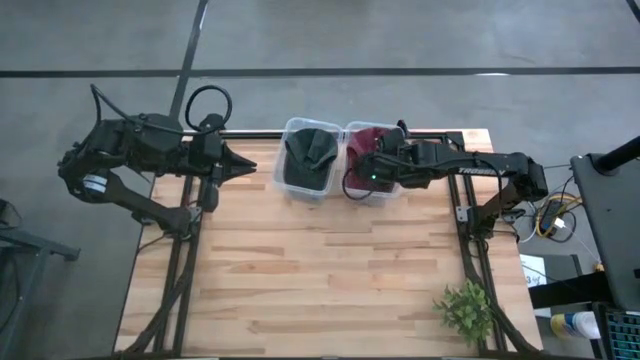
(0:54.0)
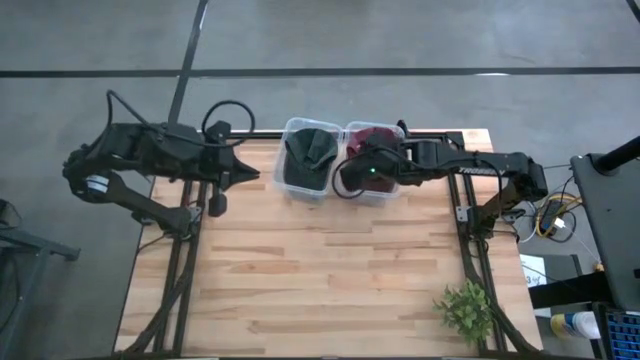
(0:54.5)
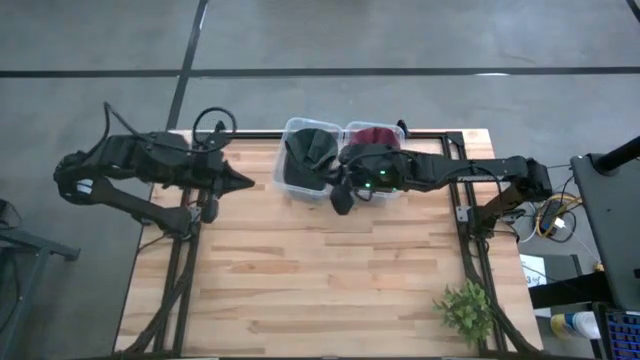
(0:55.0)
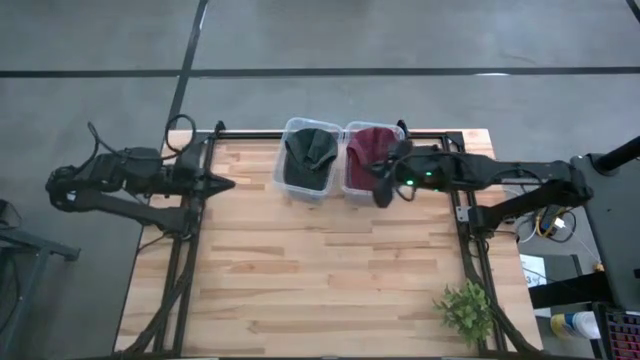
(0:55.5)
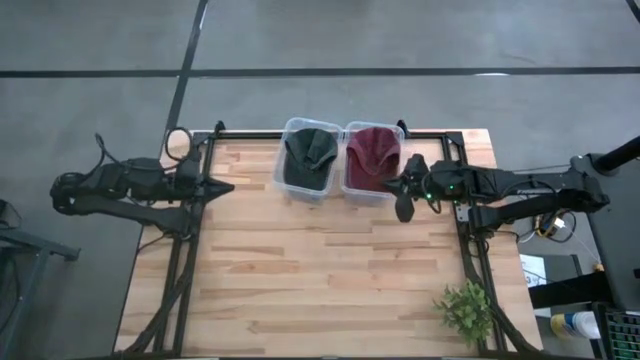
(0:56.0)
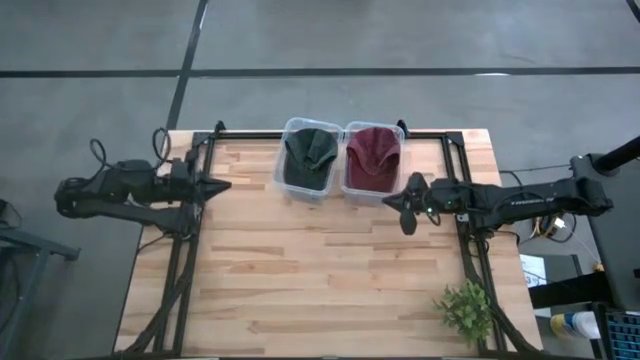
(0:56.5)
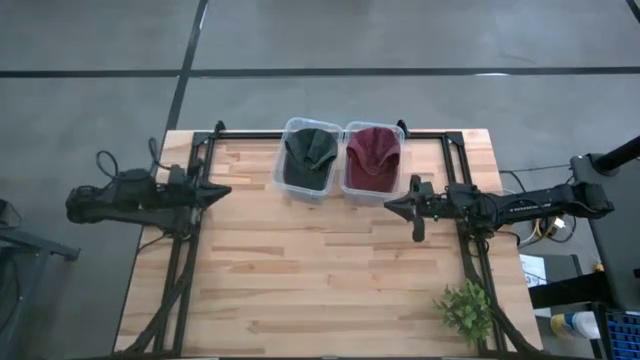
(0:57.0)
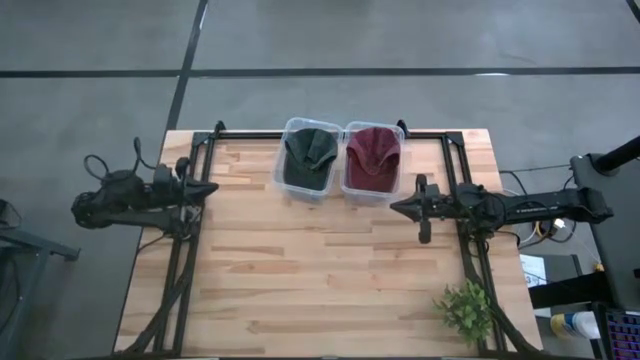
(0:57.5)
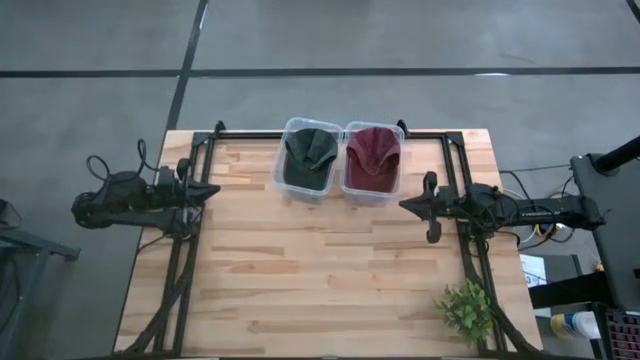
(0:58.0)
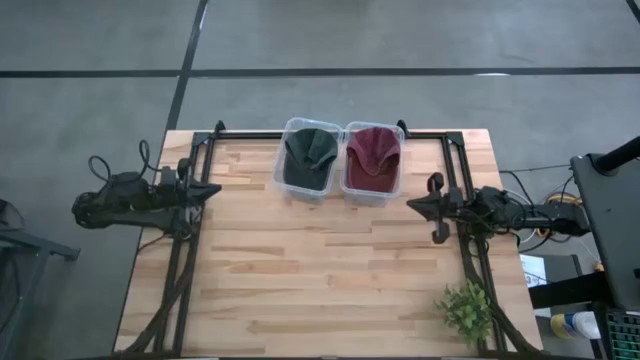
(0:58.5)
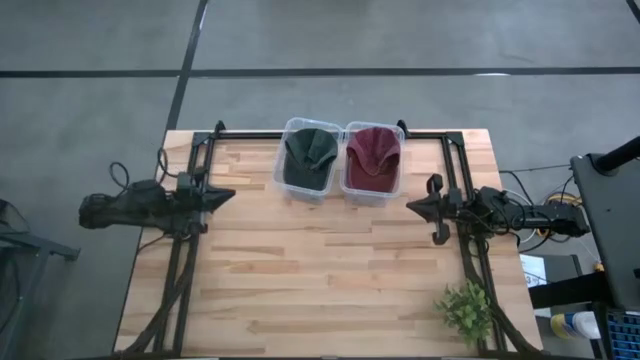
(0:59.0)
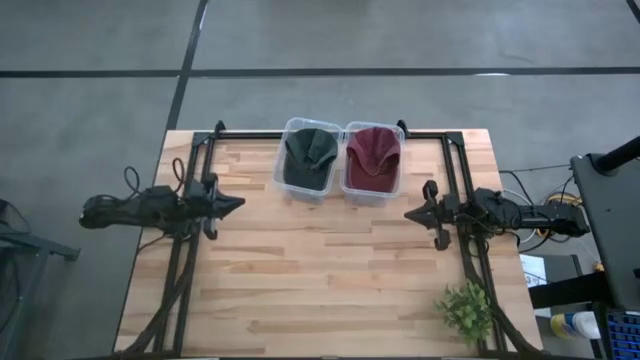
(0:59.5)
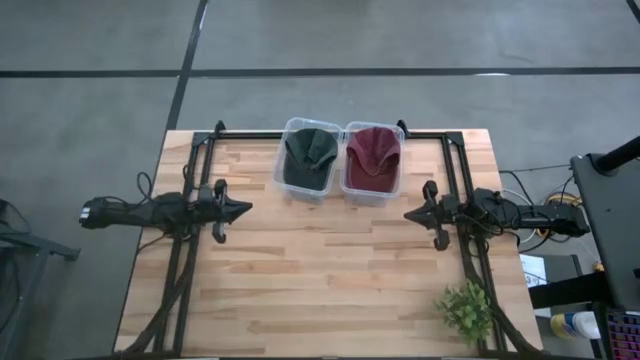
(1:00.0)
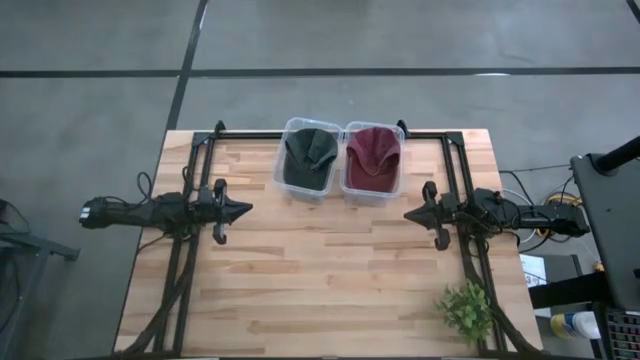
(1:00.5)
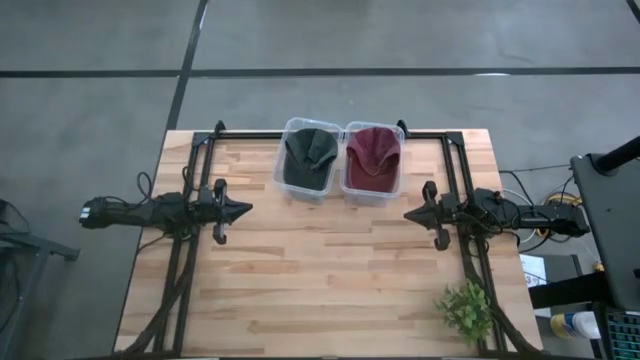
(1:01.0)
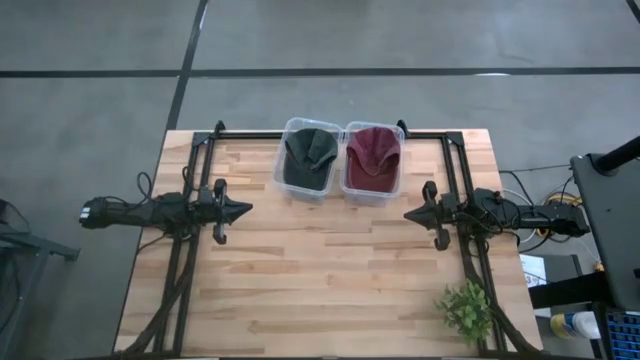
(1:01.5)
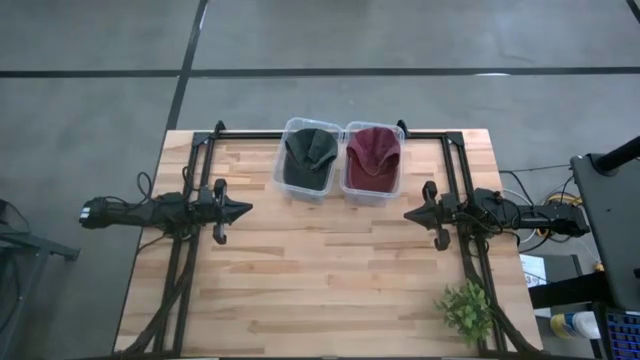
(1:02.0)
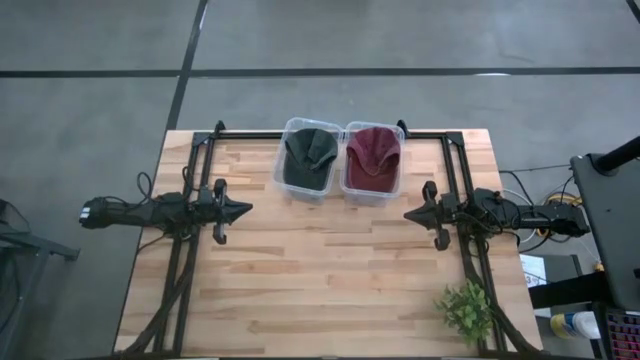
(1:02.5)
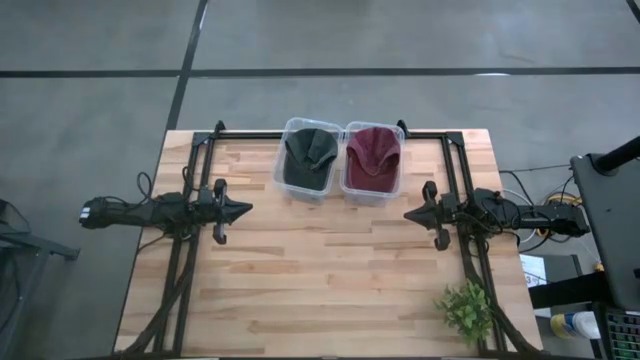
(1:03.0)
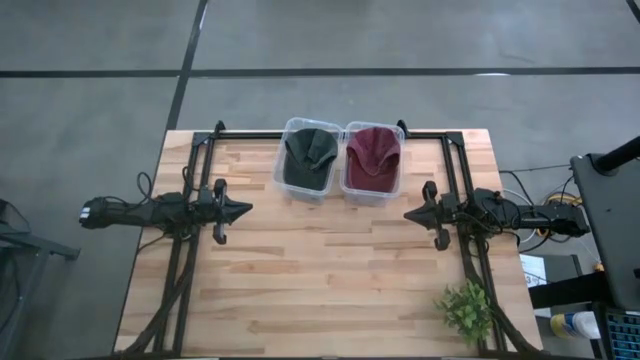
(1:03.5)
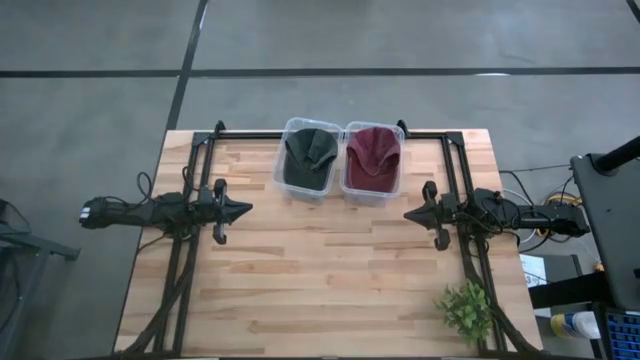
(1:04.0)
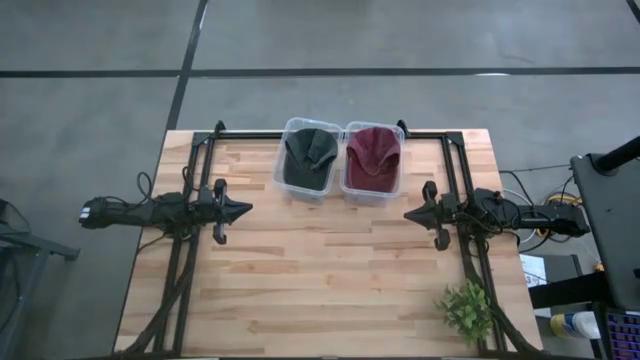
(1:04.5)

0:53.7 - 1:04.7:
Task: Pick & Place hat
Return to Home Position

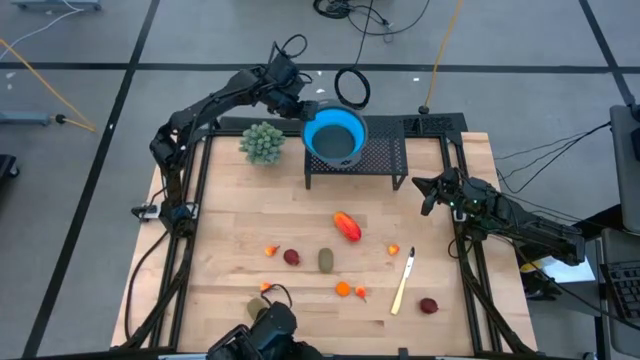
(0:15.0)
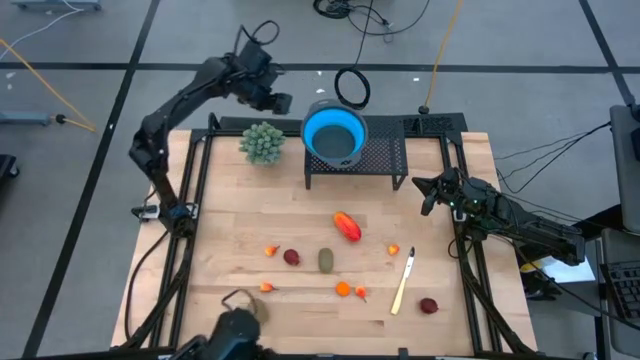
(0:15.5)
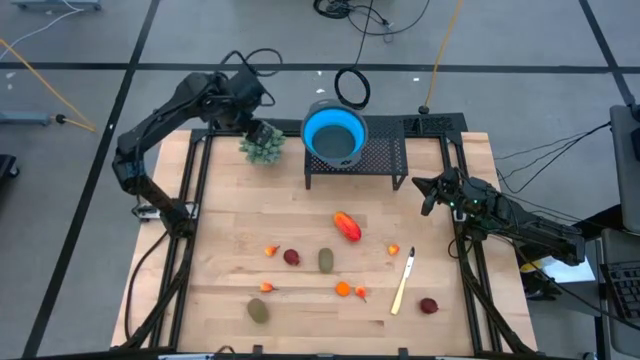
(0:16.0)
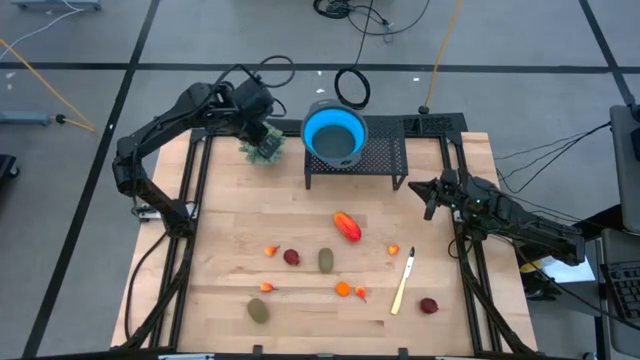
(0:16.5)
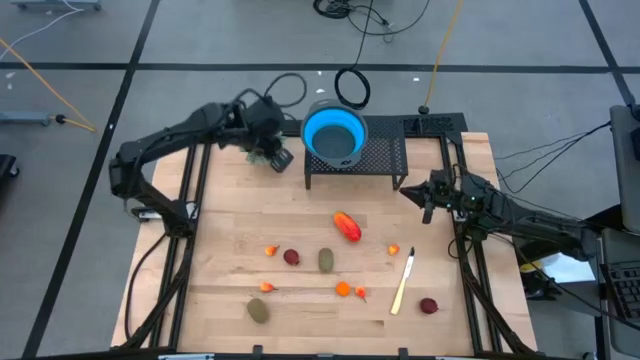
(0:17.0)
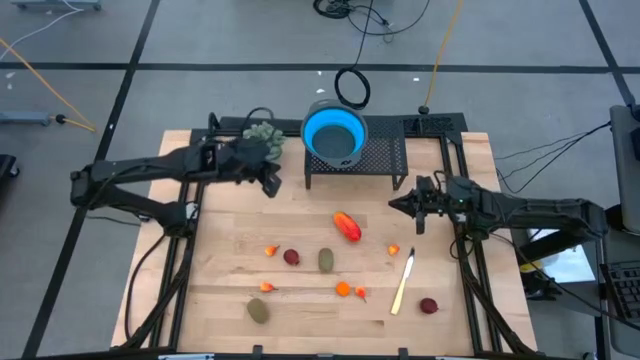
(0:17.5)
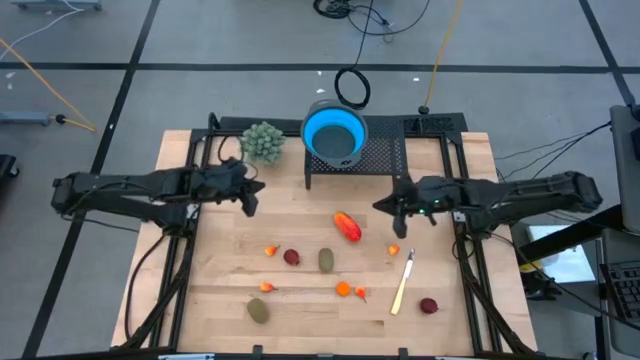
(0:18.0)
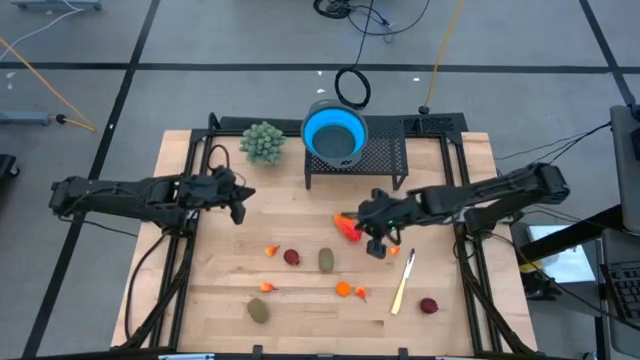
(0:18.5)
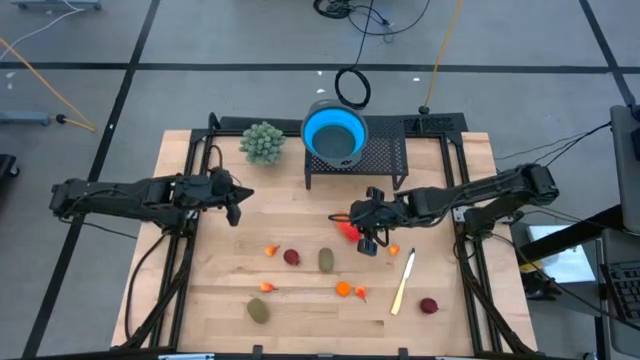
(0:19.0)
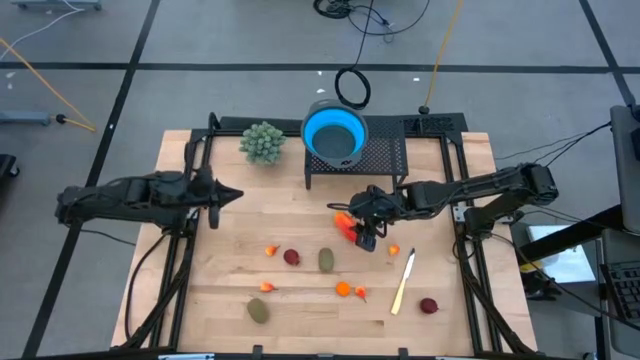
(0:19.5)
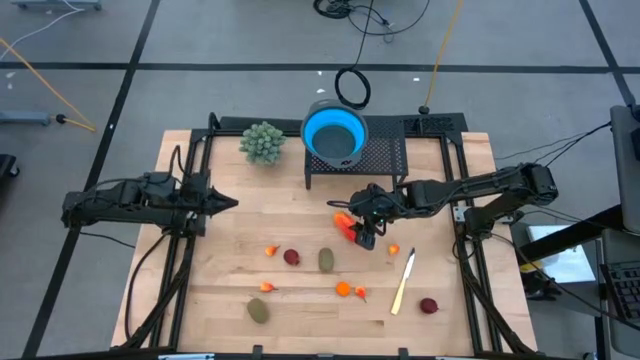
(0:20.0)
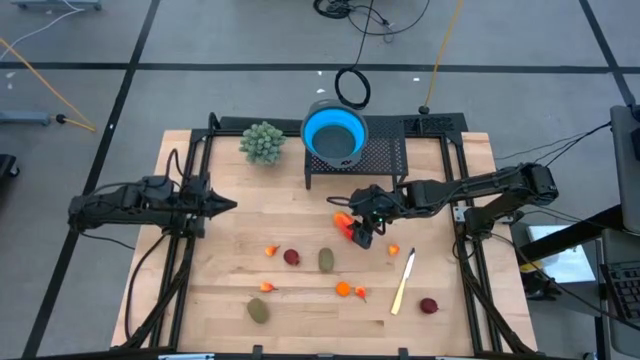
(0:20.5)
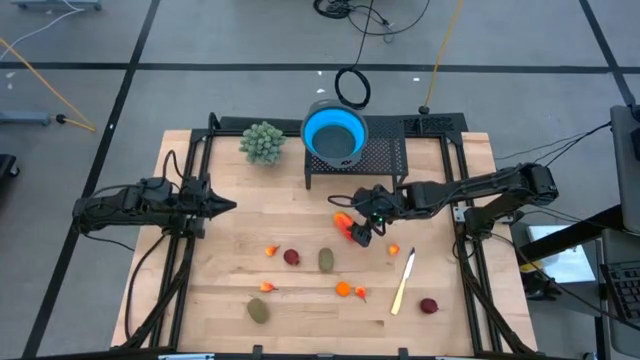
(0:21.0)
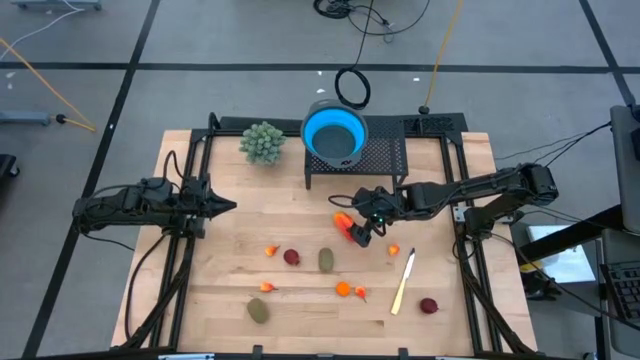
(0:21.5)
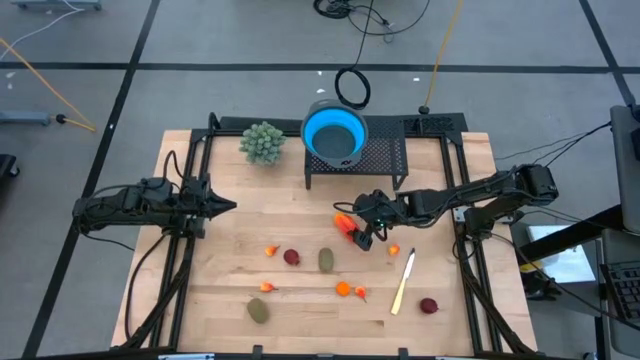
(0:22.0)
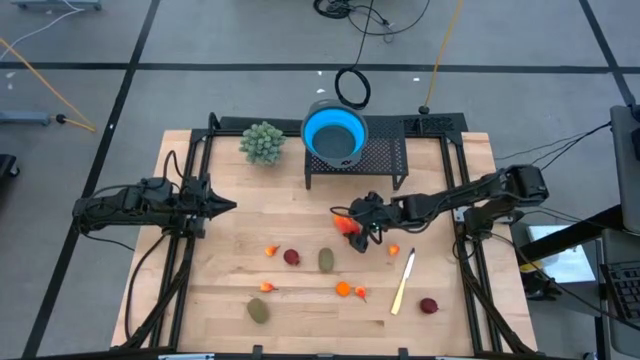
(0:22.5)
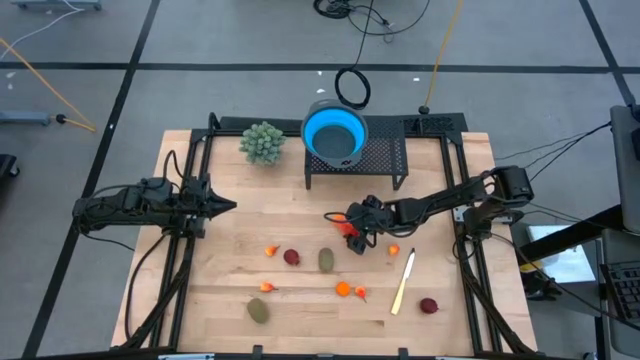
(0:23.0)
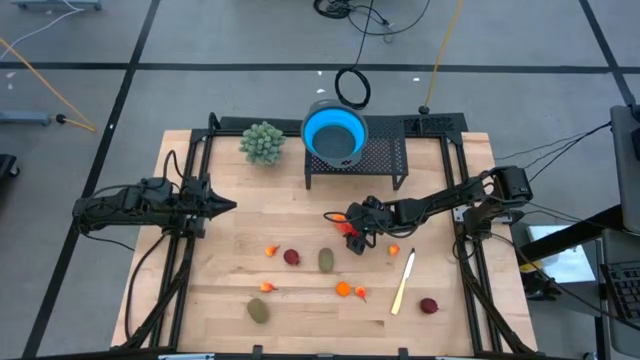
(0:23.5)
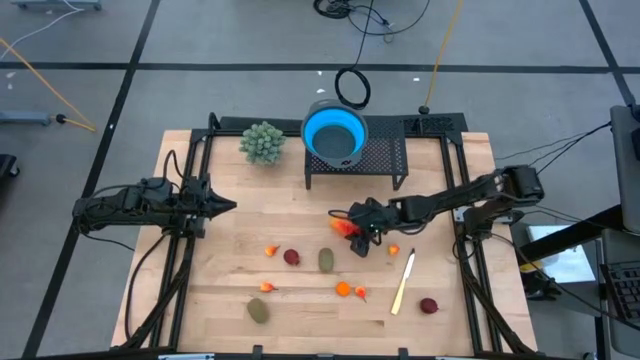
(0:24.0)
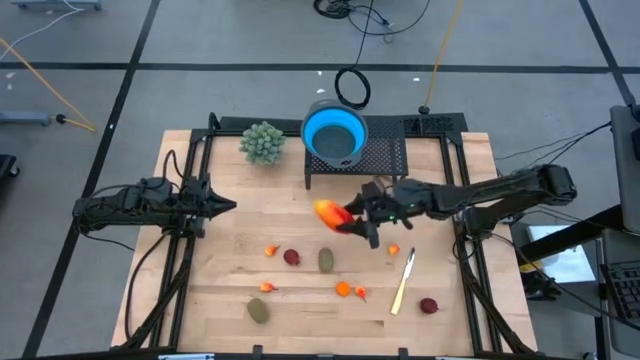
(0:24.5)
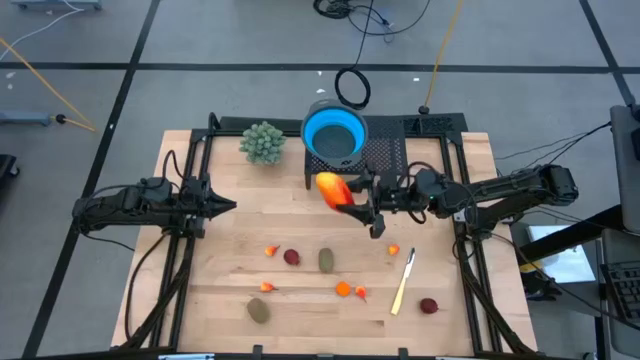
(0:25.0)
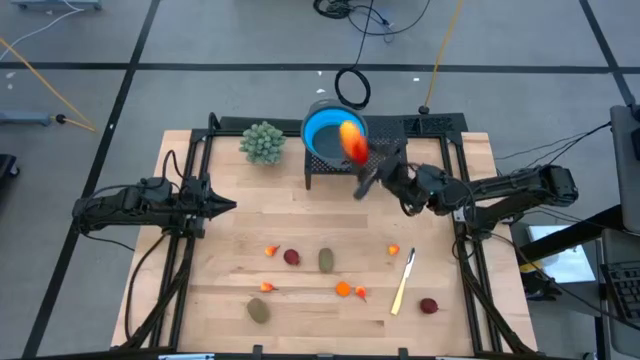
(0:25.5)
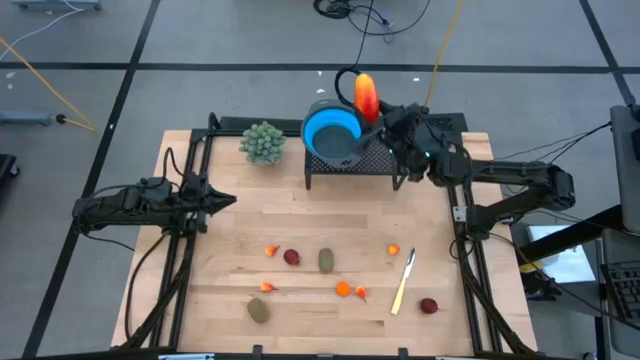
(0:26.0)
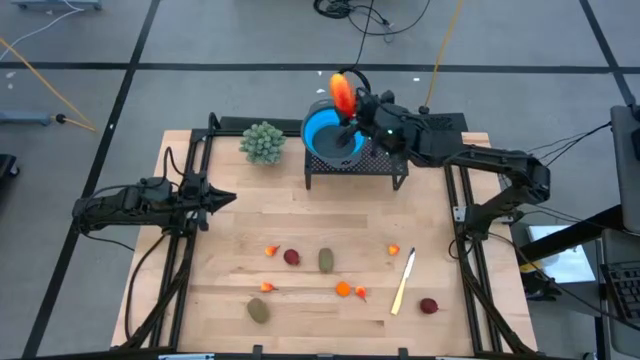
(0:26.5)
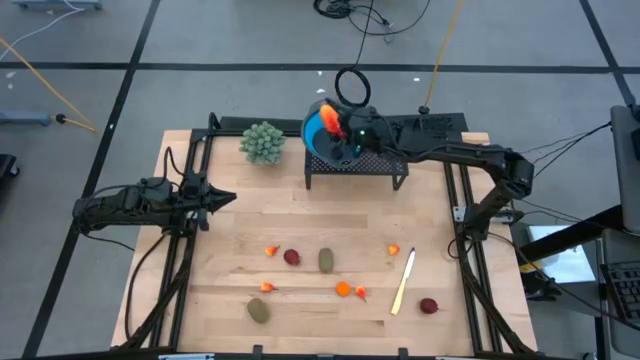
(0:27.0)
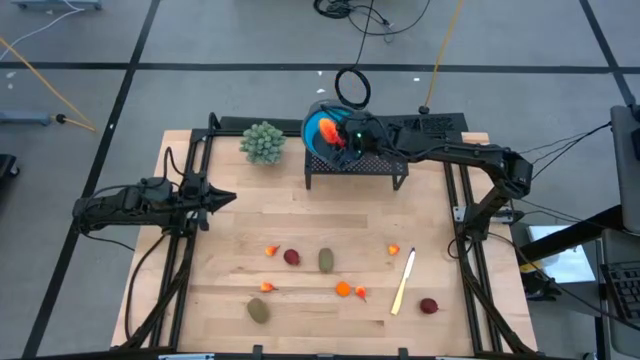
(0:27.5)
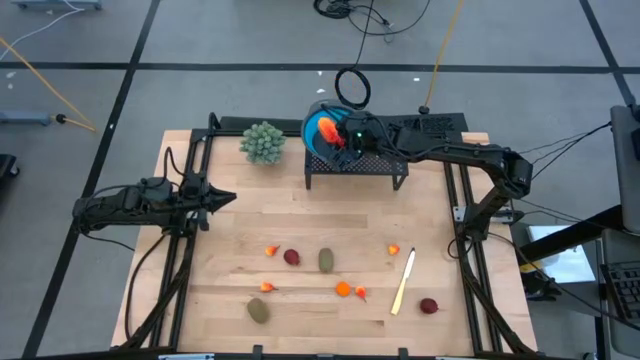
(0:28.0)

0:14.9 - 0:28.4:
Task: Pick & Place Fruit
Put the mango into the blue strainer on the shelf
